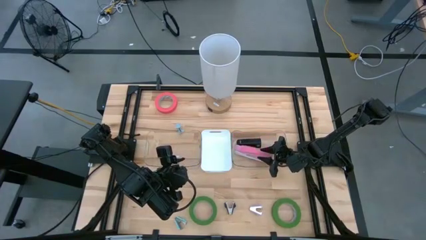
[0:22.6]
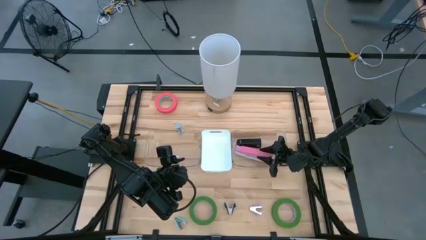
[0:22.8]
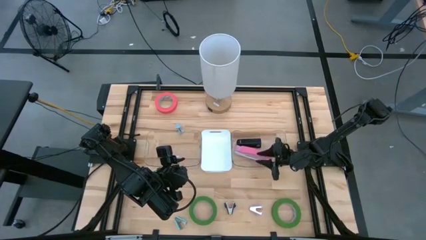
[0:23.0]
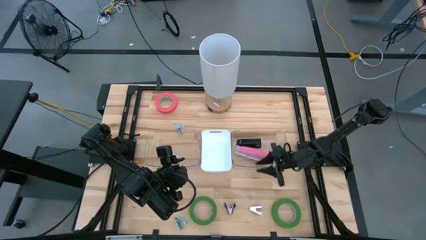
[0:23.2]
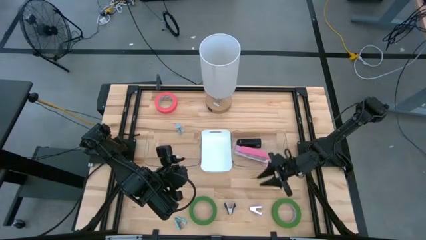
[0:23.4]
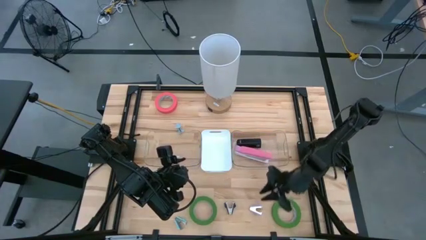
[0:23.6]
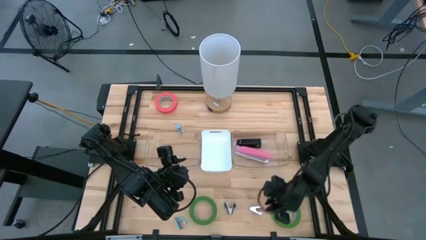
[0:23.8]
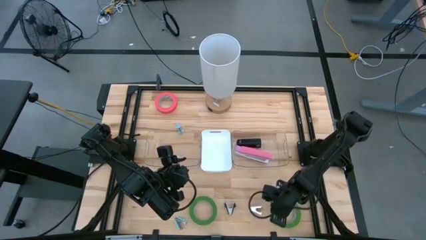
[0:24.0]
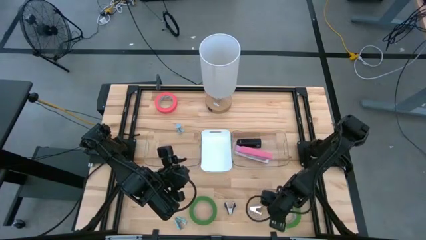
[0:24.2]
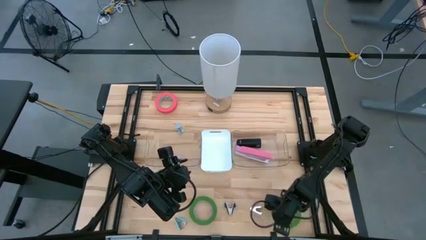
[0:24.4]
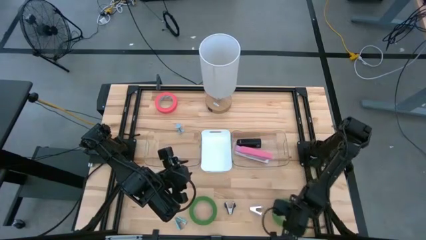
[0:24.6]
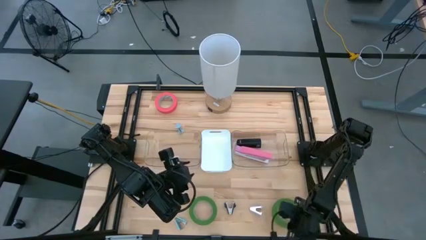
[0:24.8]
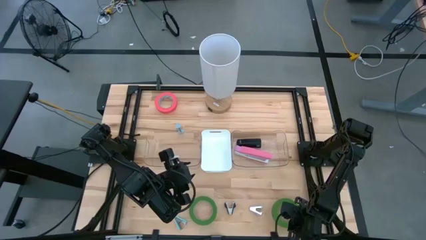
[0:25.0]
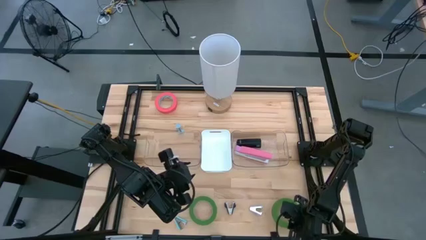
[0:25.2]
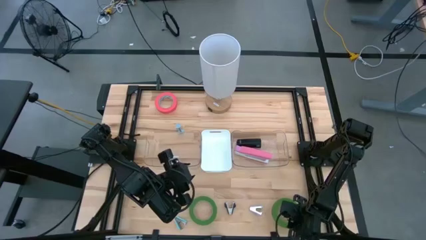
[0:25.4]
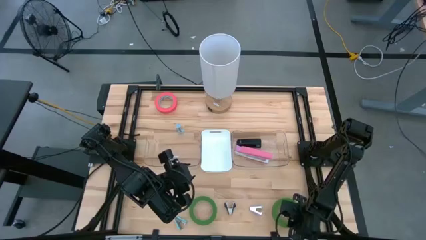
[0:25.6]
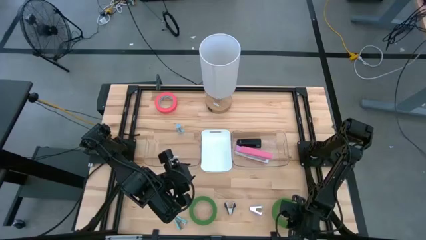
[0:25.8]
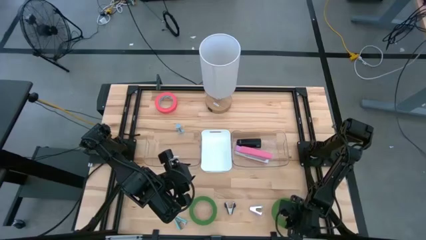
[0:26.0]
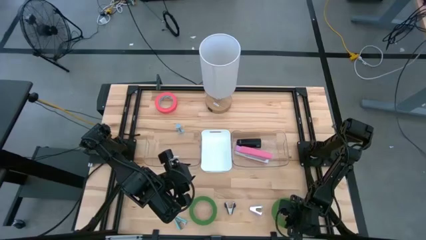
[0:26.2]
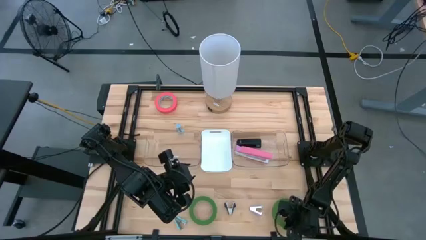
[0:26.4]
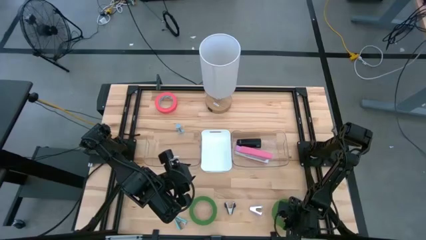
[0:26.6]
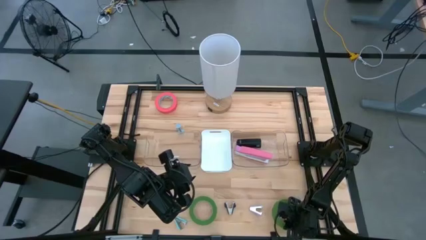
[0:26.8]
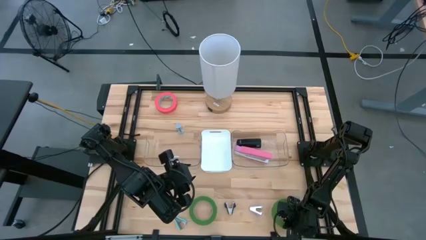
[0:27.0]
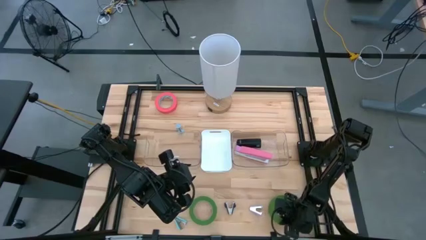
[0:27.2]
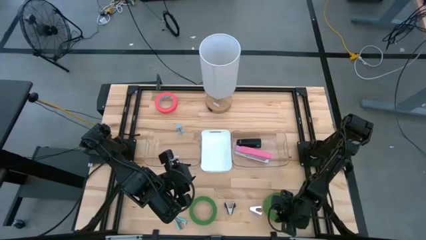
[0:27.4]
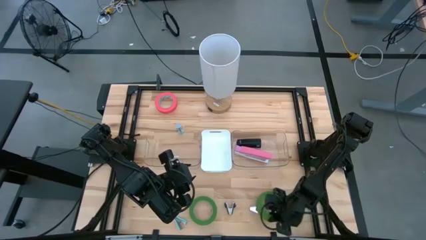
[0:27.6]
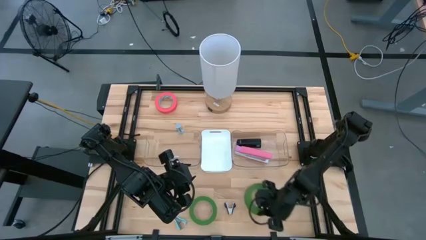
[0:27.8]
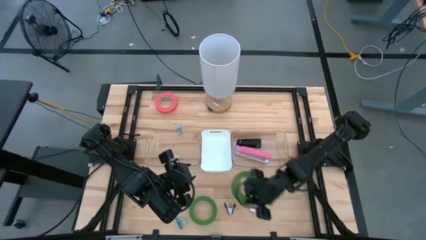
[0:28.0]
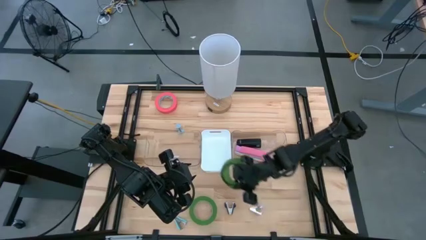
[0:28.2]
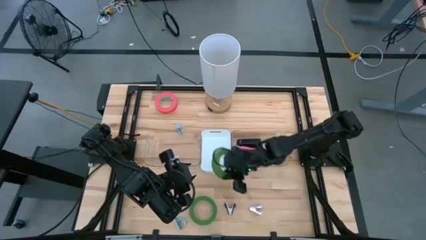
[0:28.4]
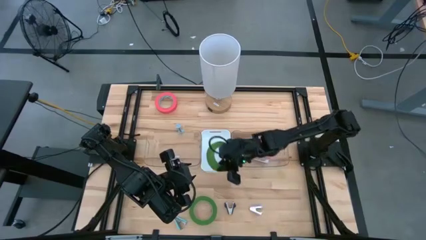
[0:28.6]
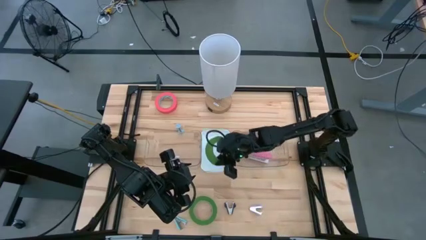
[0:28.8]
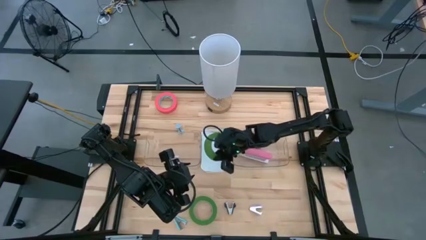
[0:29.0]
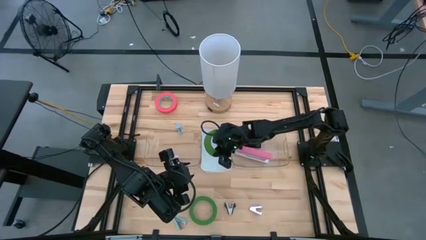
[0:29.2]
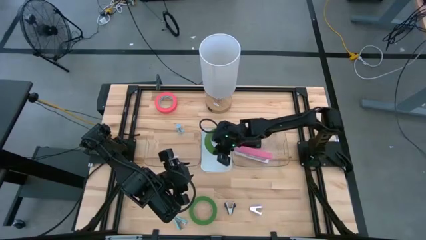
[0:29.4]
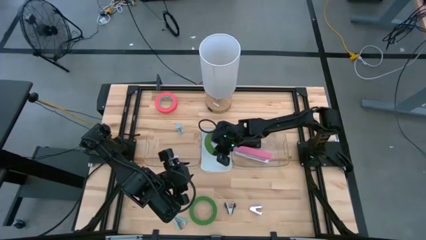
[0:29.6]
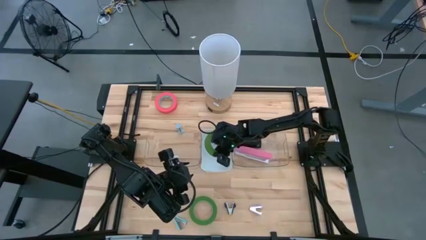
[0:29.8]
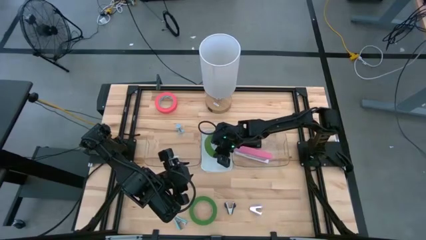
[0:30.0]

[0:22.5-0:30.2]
Task: Pick and place Stapler, Stapler remover, tape
Put the green tape into the white bin

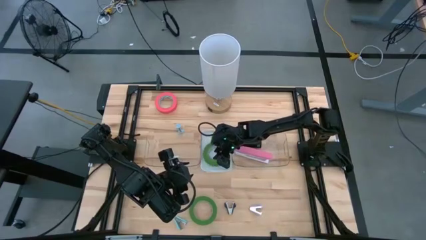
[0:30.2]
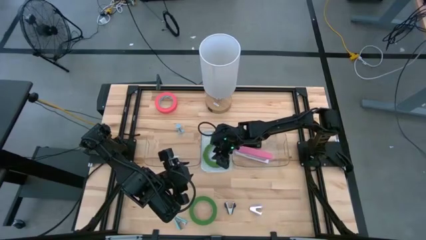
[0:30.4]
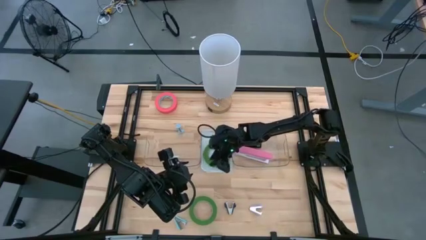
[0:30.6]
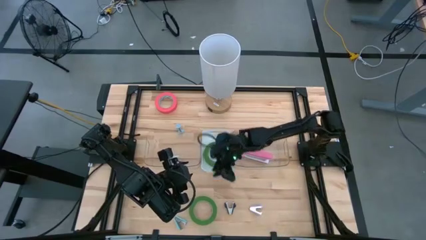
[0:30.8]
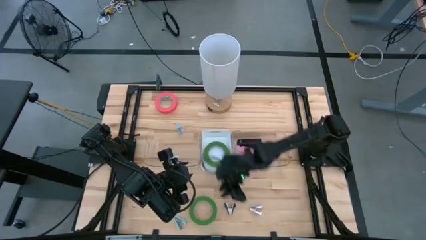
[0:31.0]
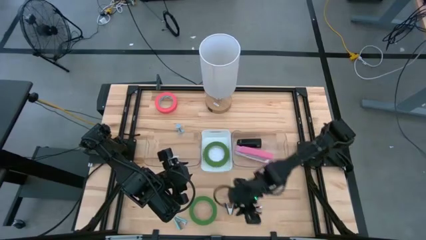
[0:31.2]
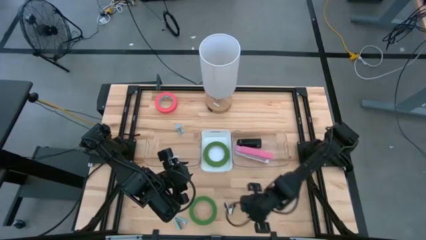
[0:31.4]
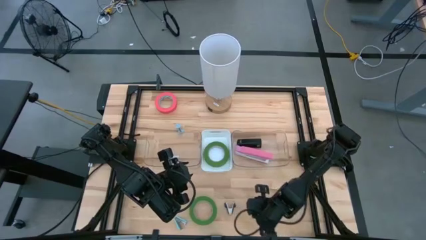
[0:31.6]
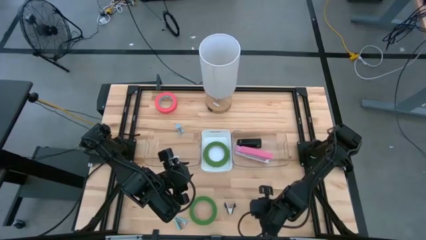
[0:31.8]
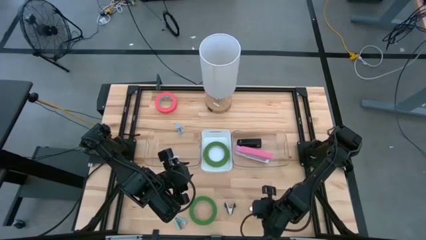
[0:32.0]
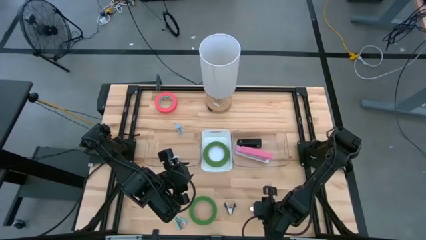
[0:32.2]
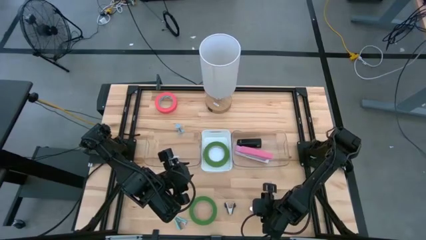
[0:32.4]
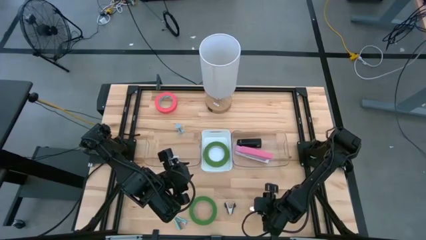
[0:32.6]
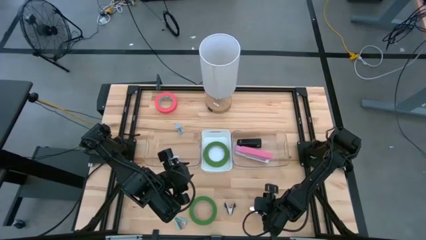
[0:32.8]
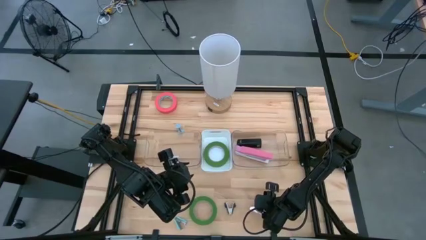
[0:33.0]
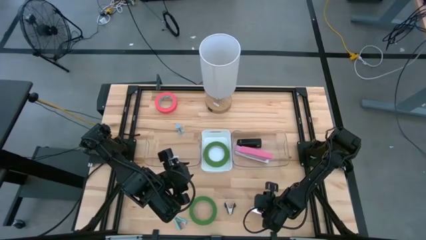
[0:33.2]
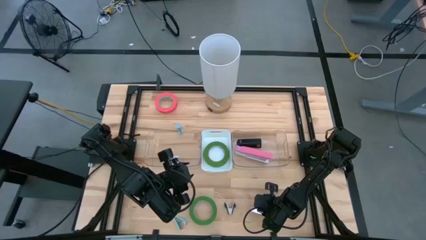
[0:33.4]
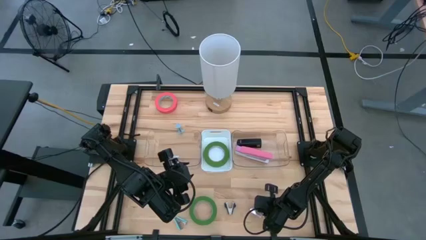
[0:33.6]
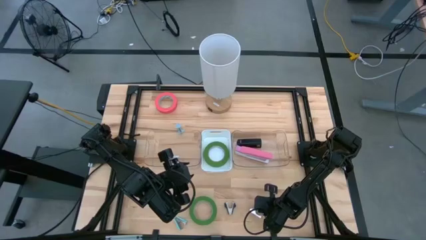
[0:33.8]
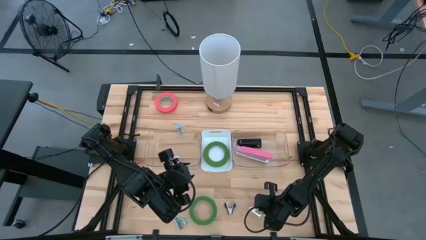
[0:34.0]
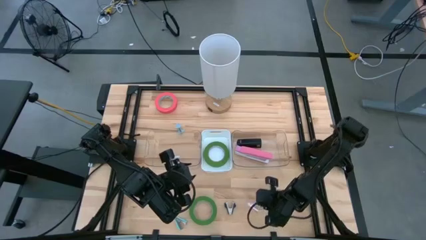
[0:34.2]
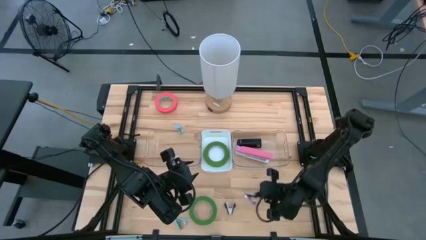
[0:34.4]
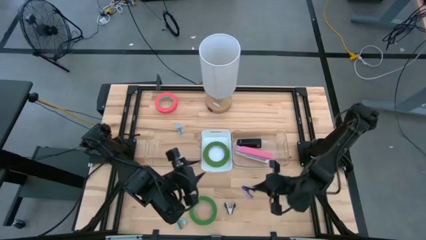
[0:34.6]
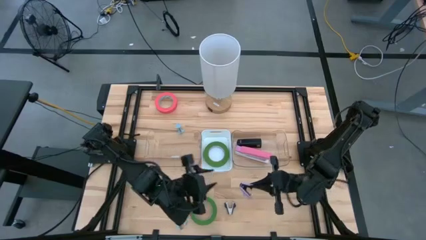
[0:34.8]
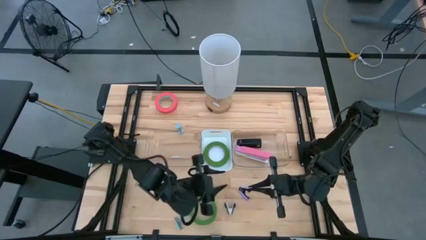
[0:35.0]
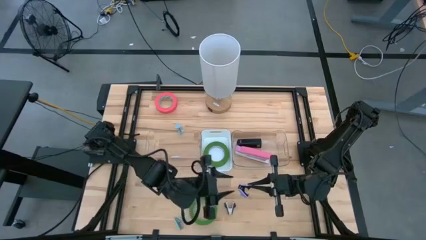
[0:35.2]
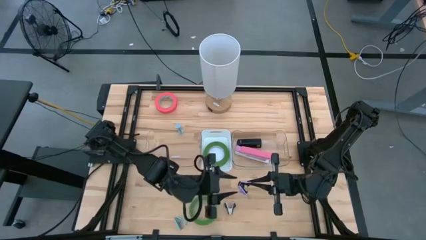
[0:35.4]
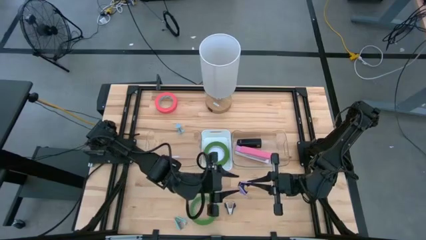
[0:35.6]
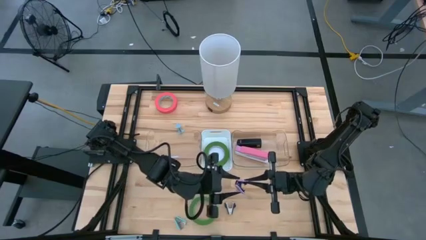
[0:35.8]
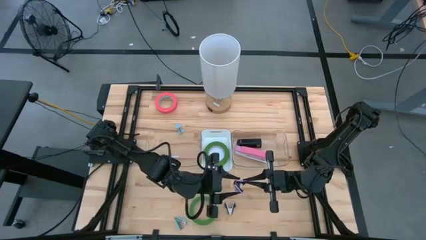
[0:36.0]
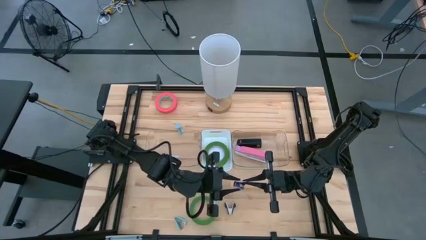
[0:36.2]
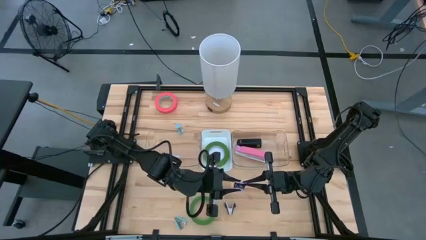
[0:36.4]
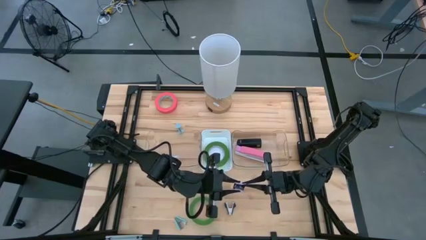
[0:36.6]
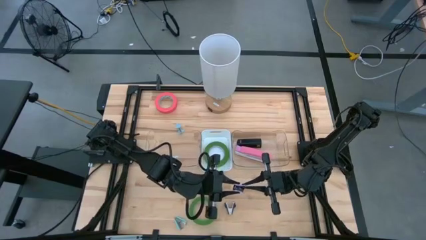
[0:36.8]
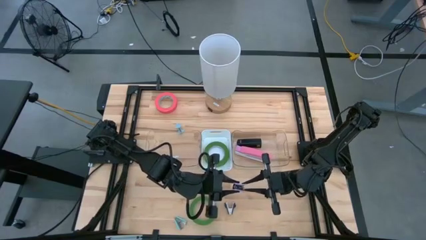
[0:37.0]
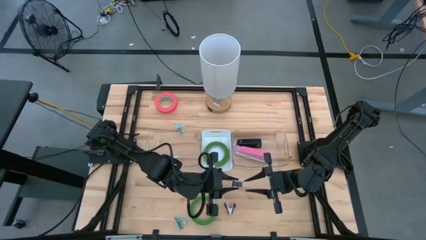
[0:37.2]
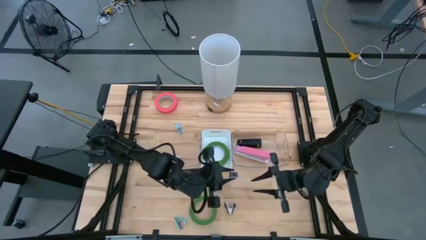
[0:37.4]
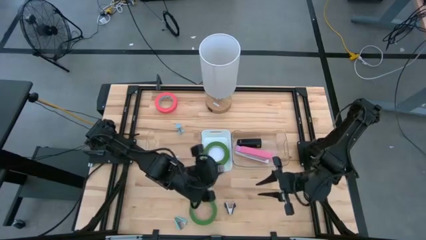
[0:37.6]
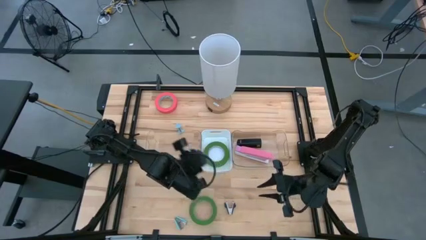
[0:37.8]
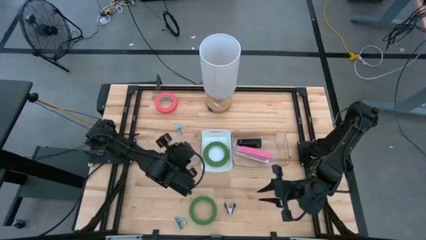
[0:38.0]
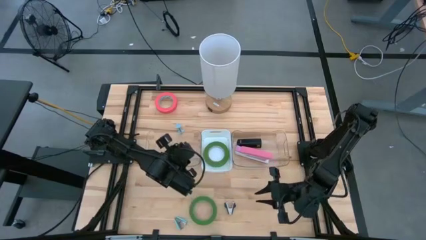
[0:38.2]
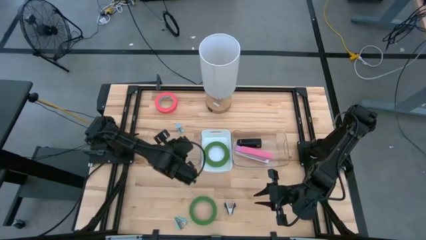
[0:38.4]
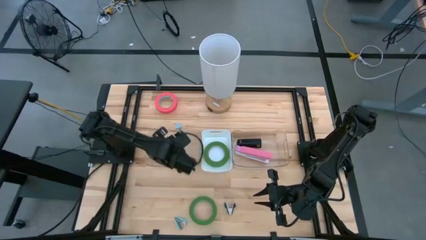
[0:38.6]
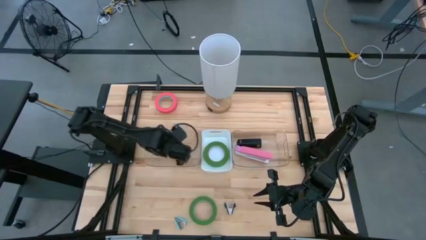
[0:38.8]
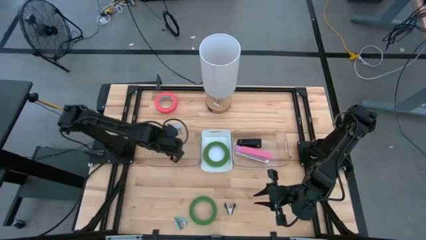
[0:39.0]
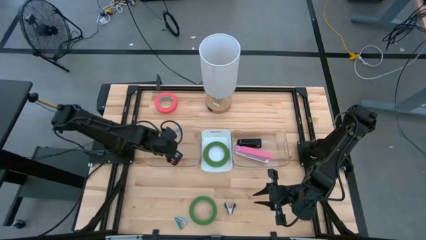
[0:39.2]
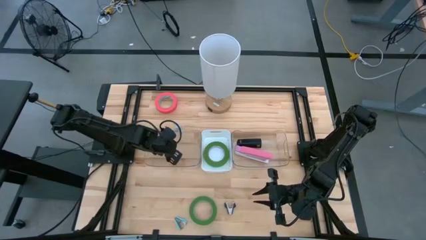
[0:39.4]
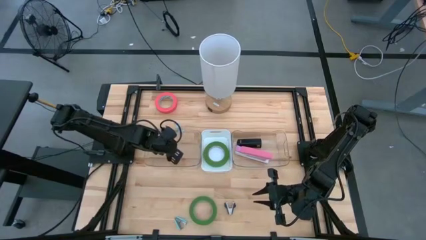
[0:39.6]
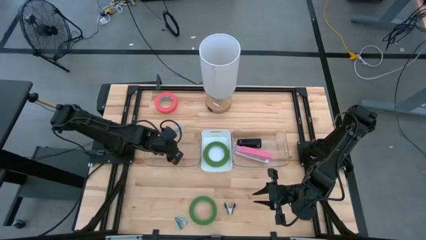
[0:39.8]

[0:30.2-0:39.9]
Put the purple staple remover into the left transparent bin
